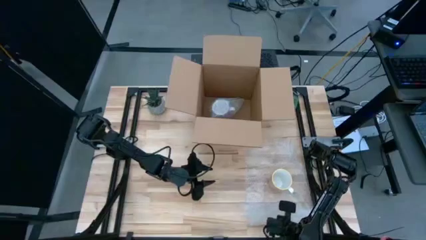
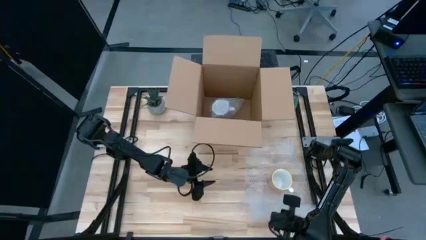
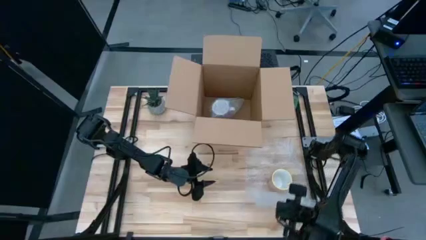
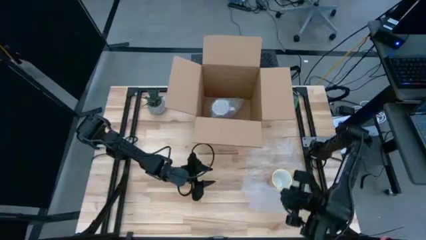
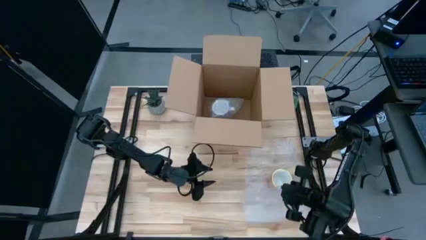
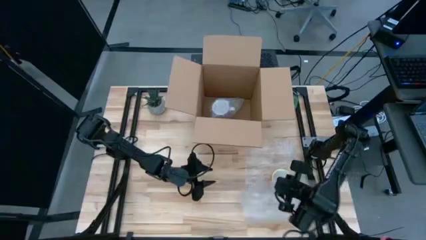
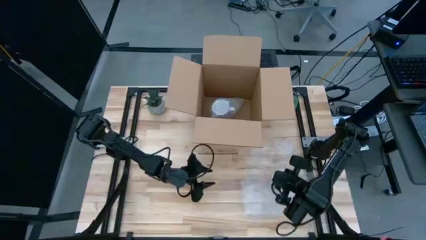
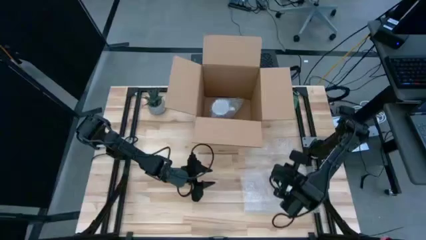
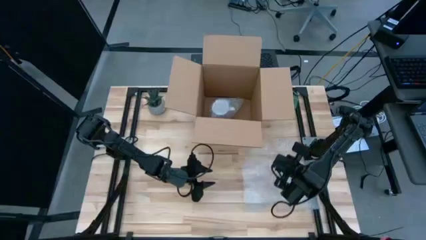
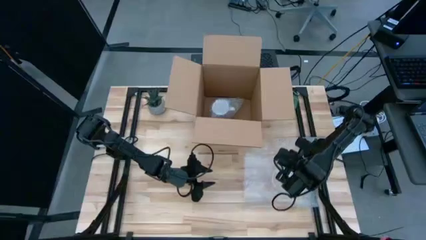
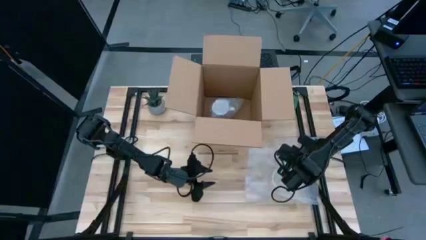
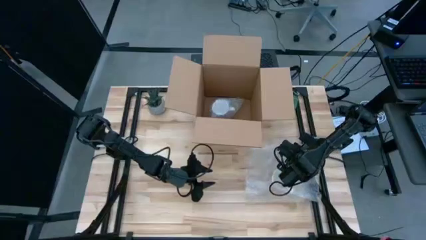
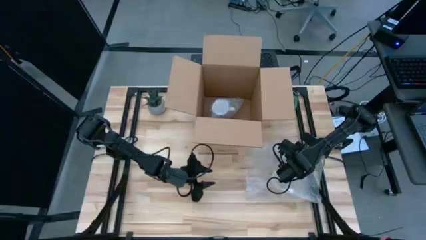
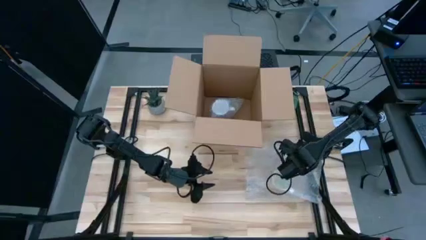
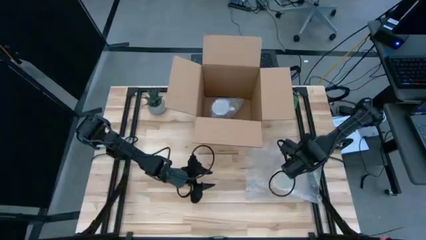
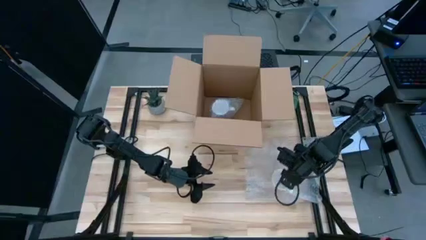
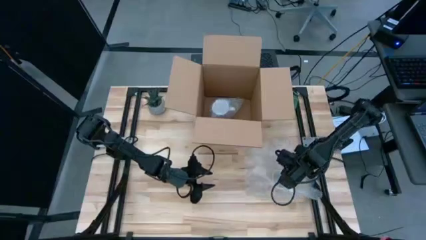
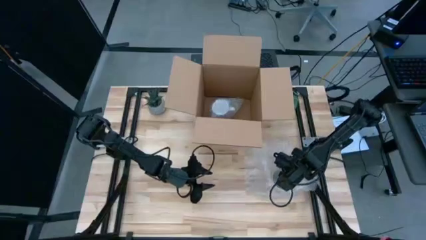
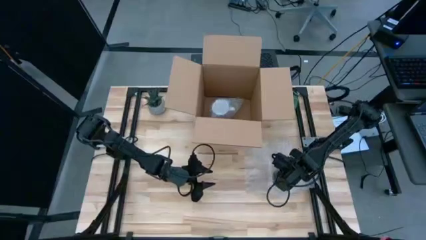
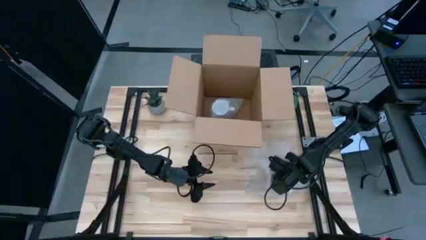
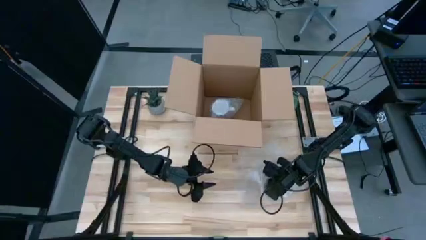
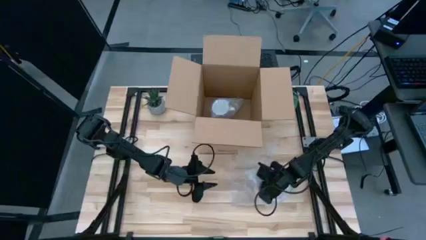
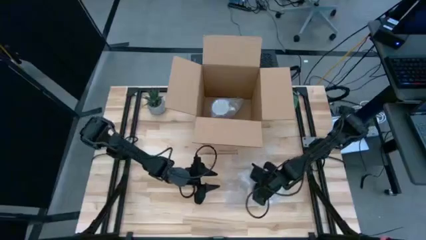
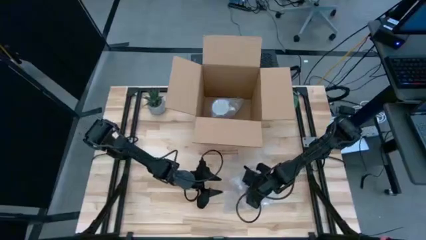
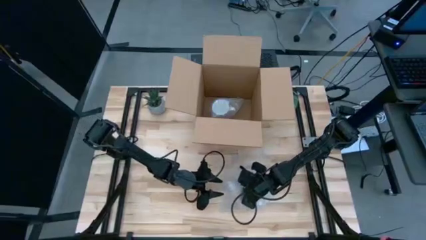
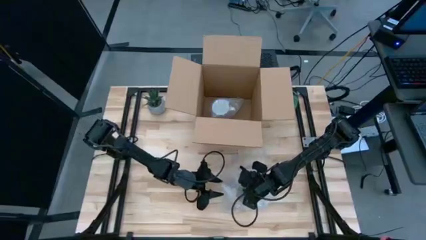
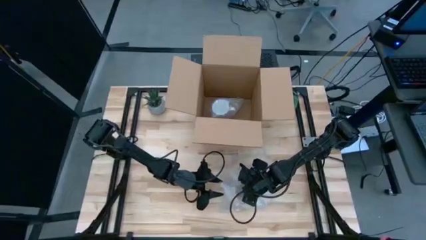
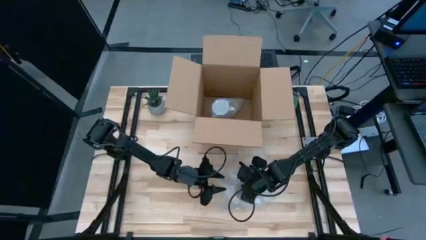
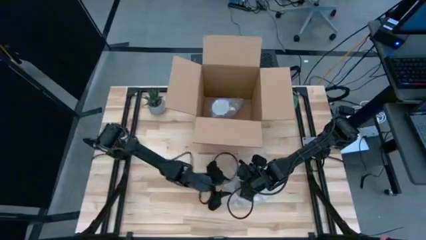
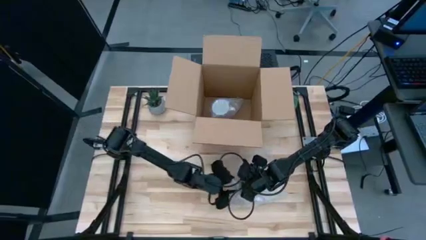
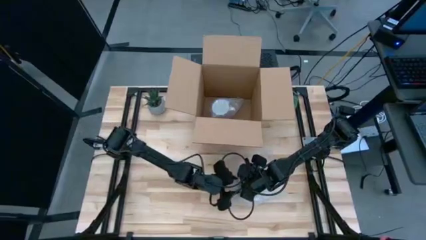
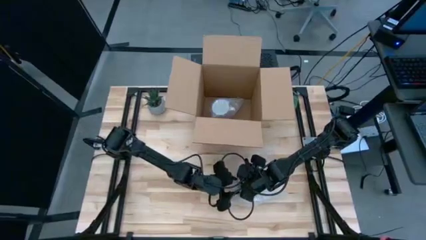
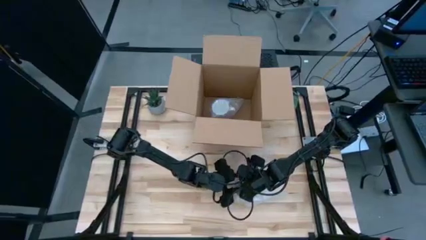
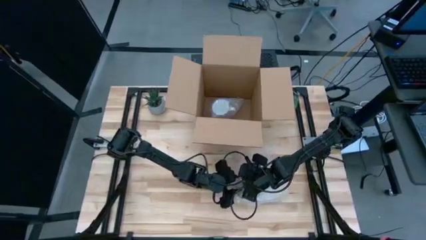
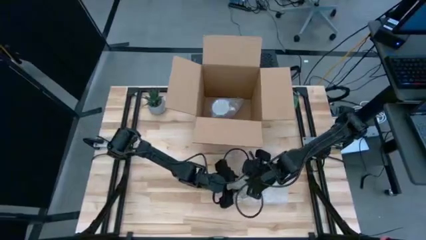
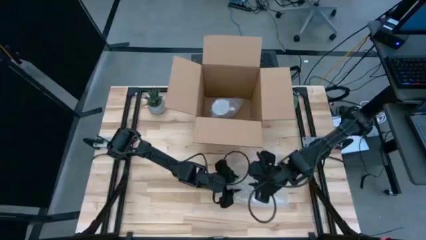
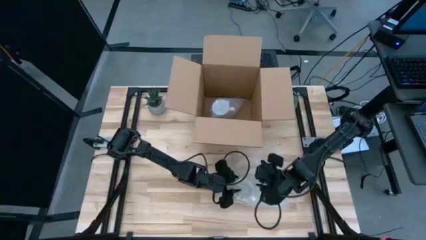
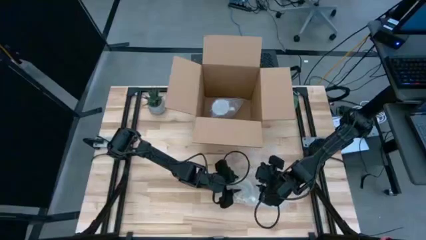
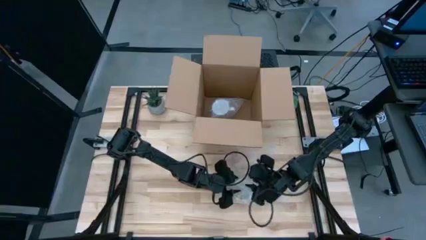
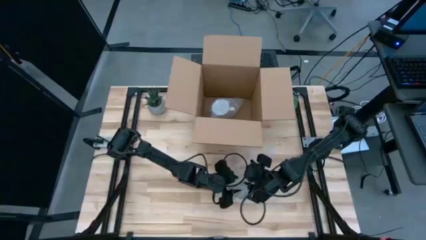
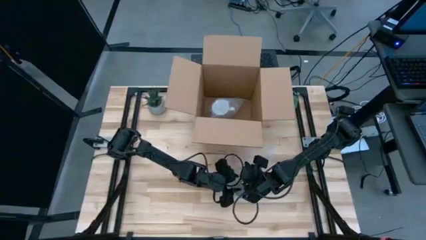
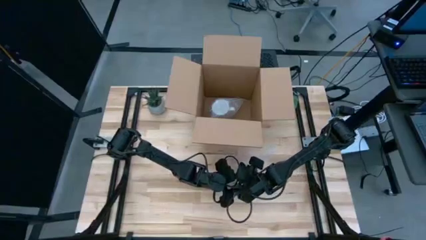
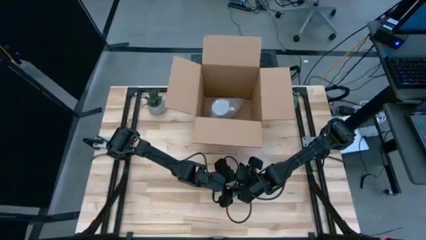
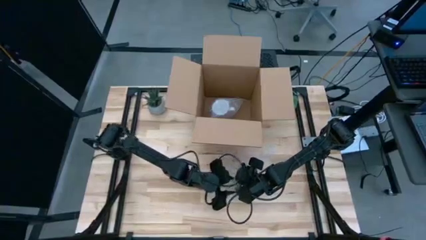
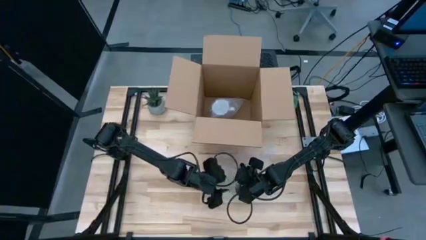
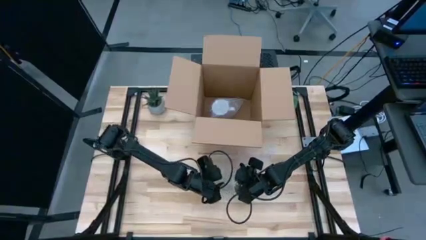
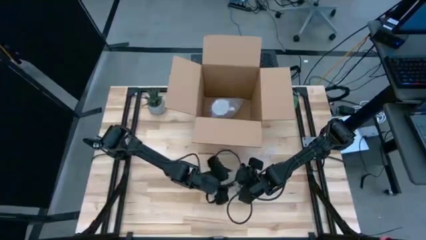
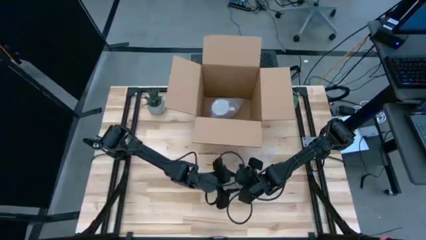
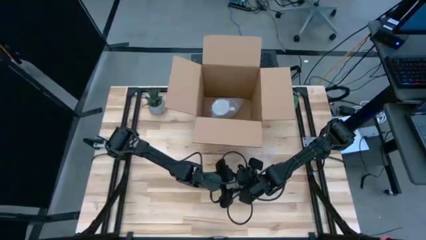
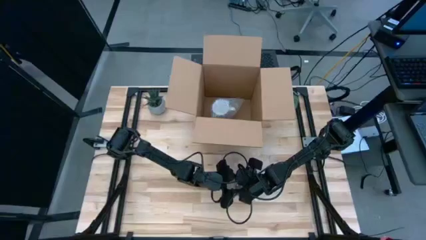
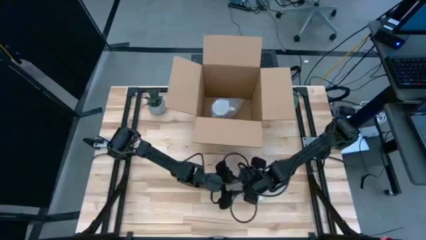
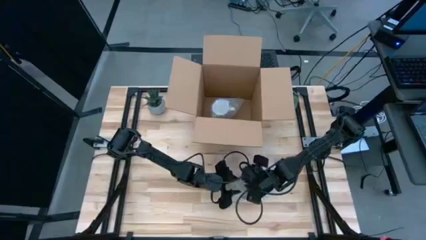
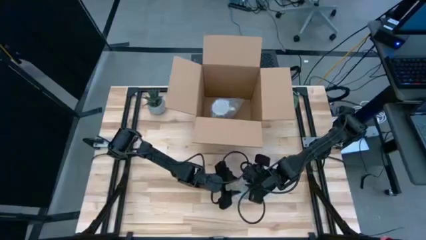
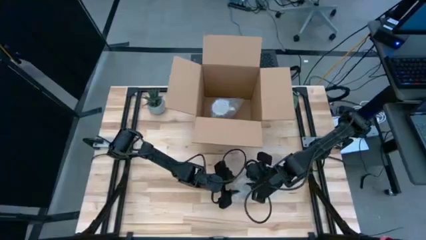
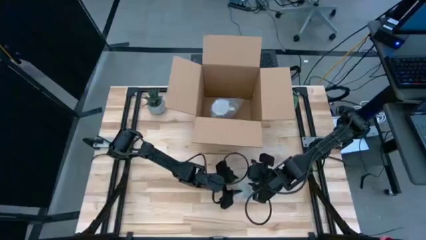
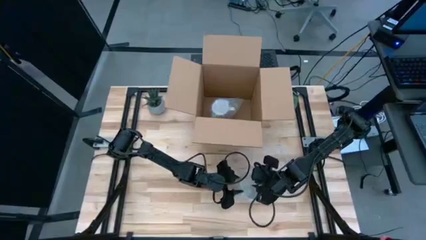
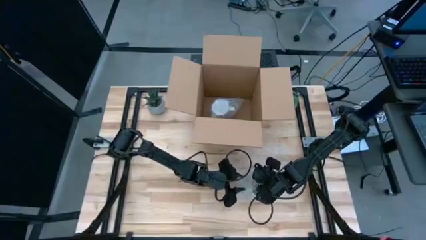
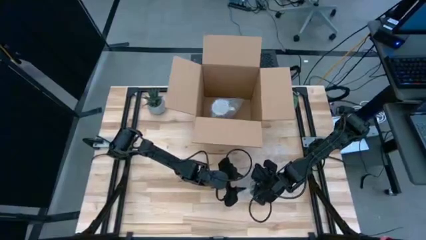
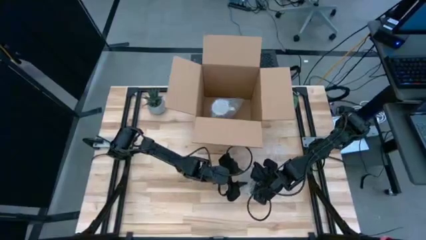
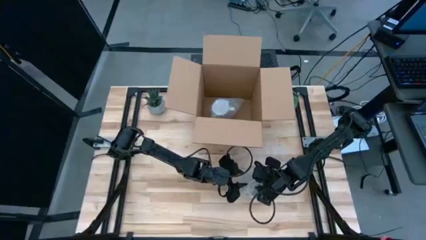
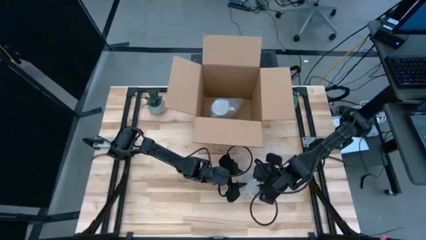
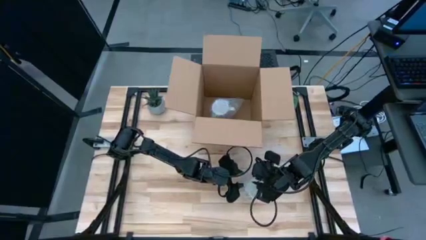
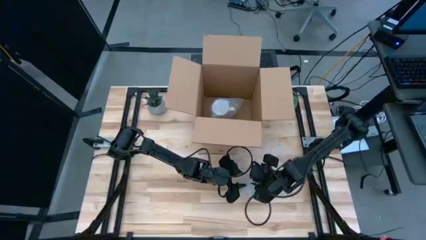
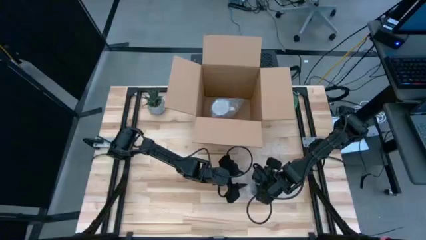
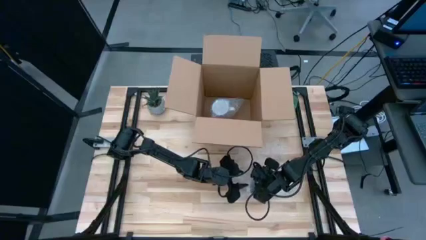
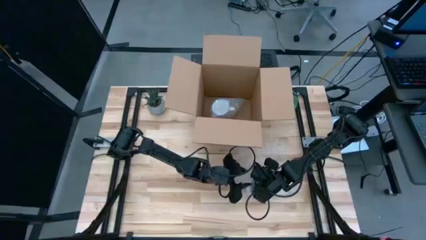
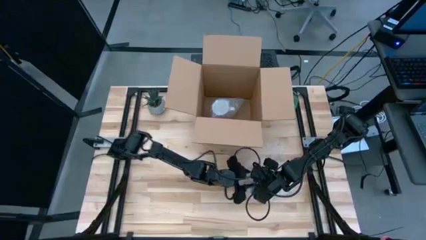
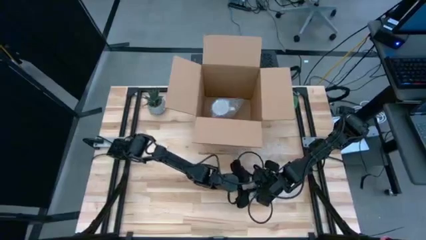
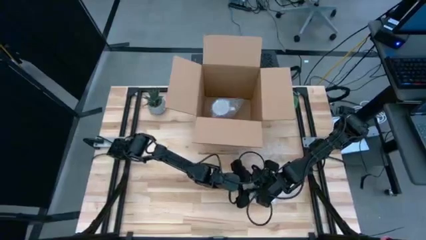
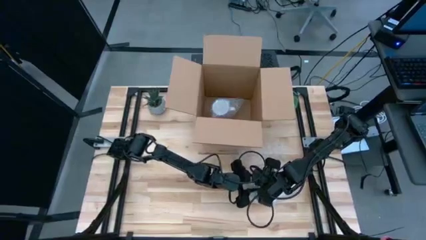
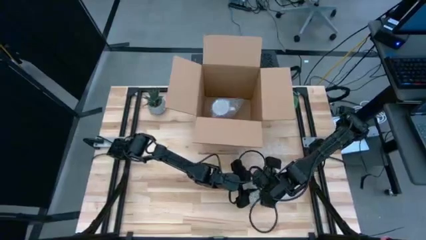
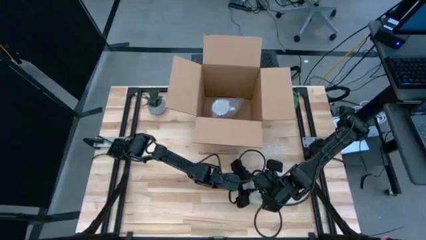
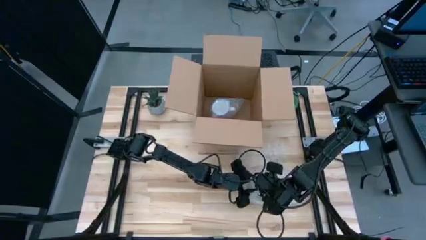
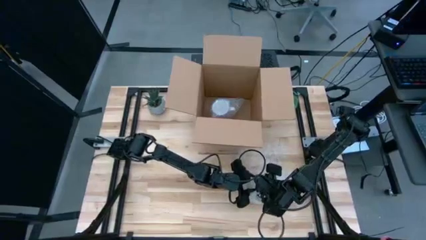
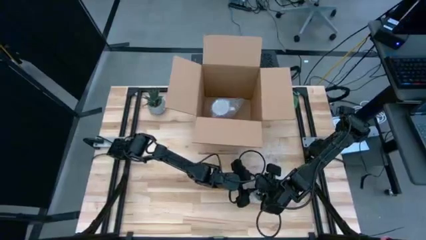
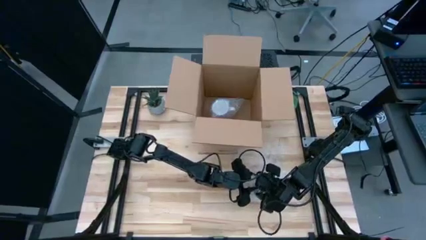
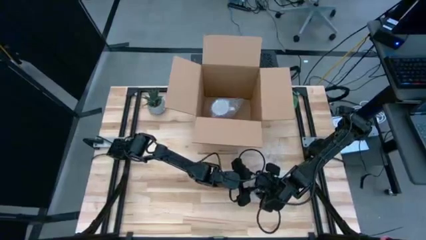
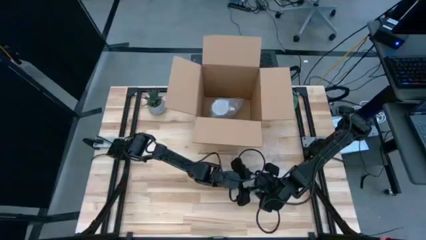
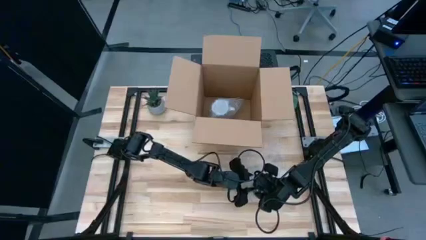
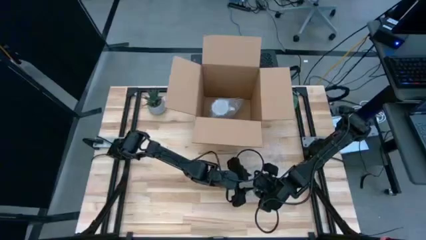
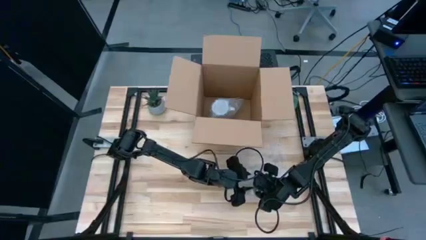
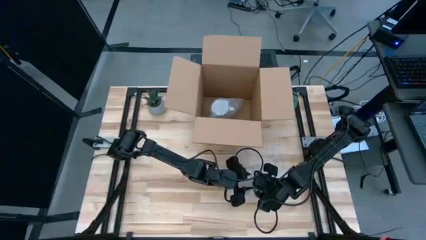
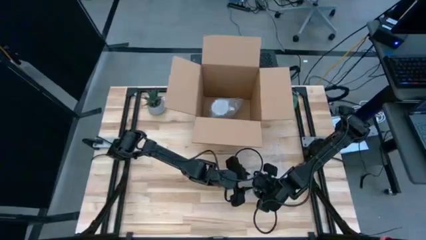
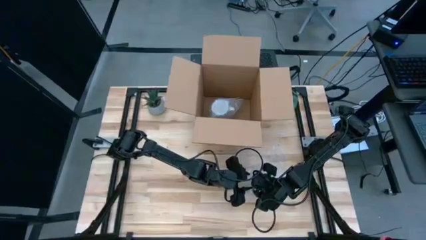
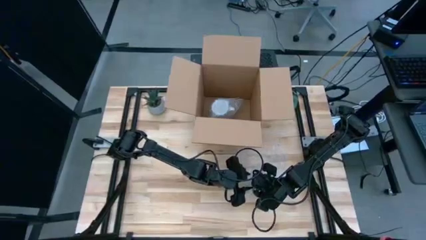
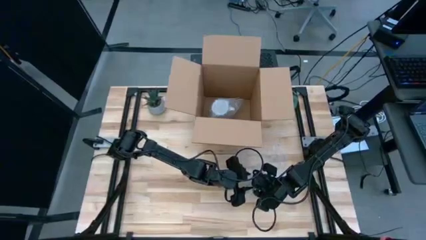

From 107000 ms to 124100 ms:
Task: wrap mug
Wrap the orange mug with the bubble wrap
